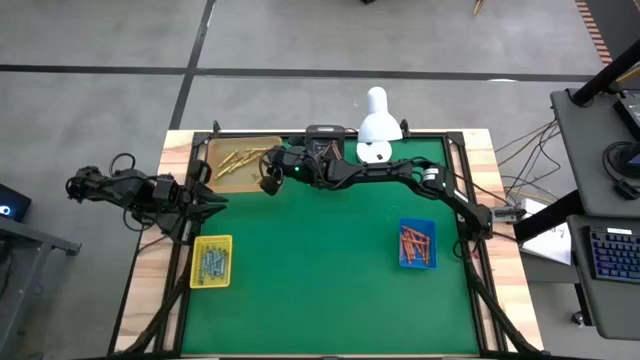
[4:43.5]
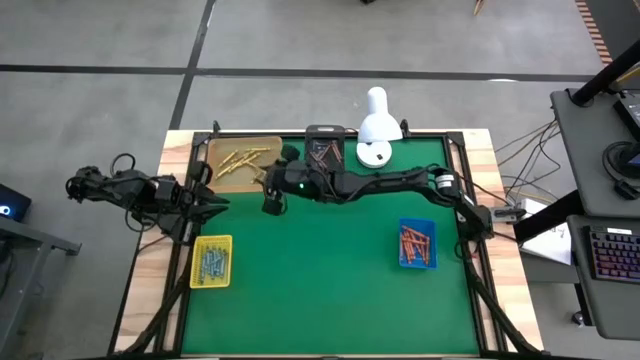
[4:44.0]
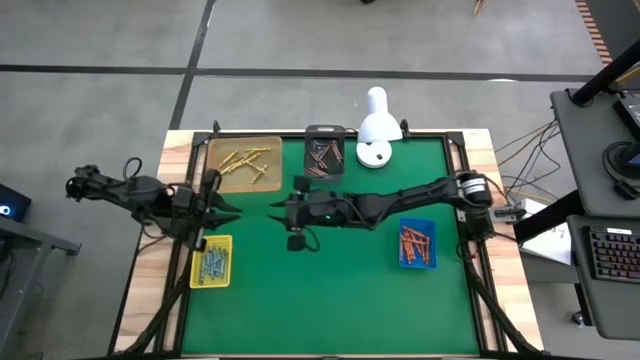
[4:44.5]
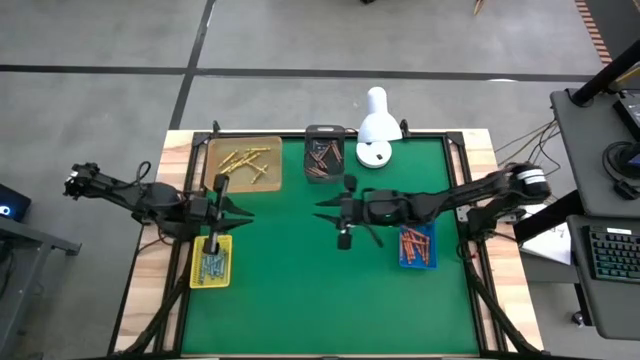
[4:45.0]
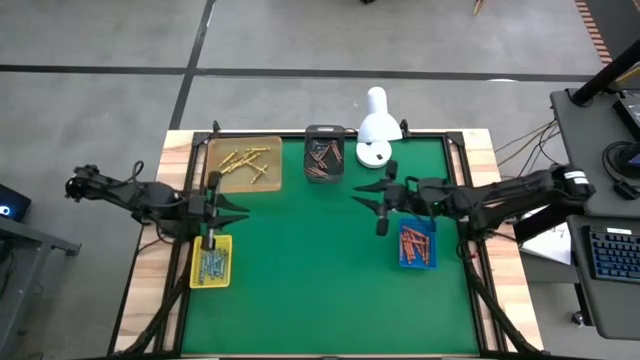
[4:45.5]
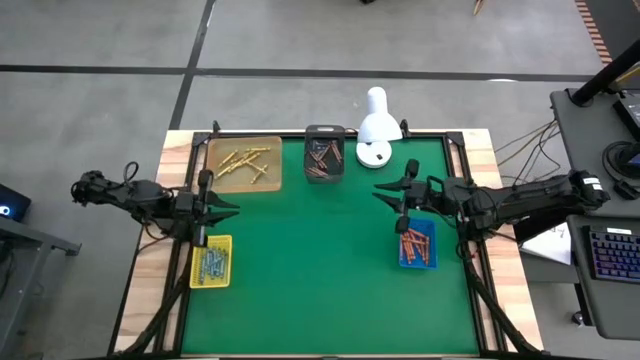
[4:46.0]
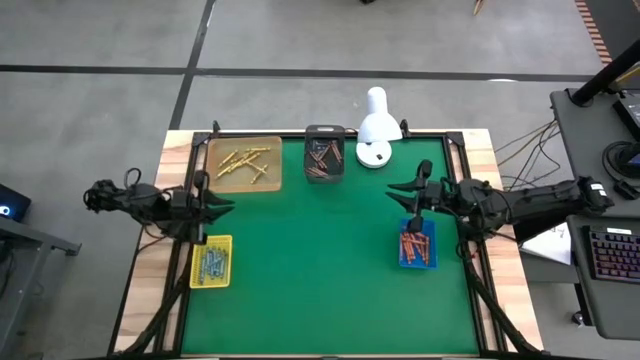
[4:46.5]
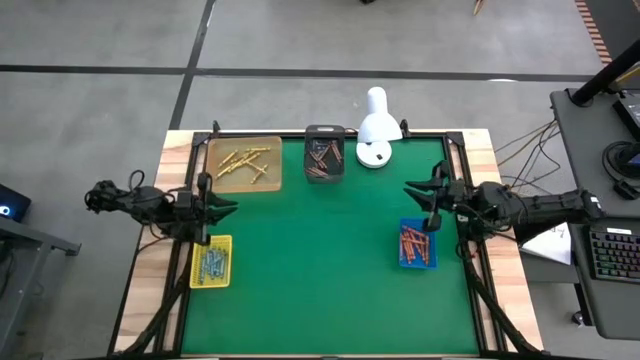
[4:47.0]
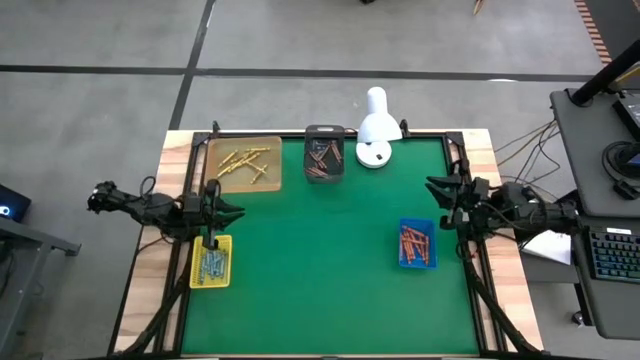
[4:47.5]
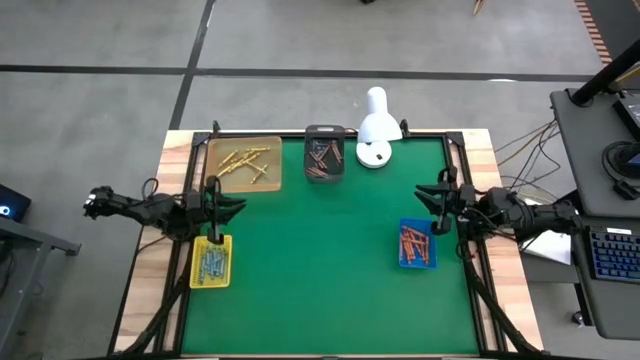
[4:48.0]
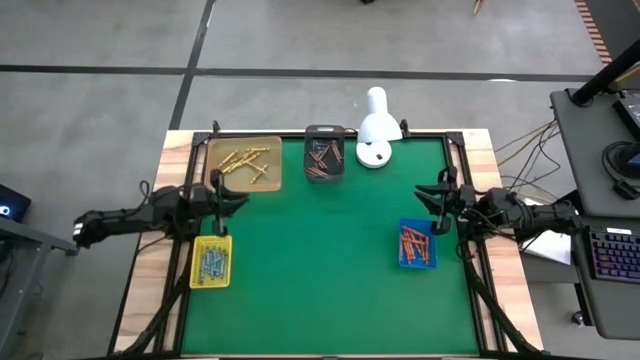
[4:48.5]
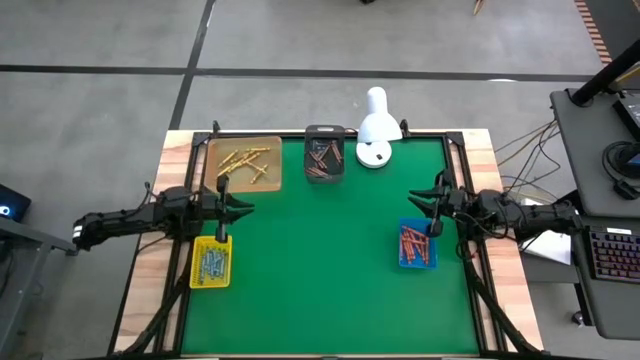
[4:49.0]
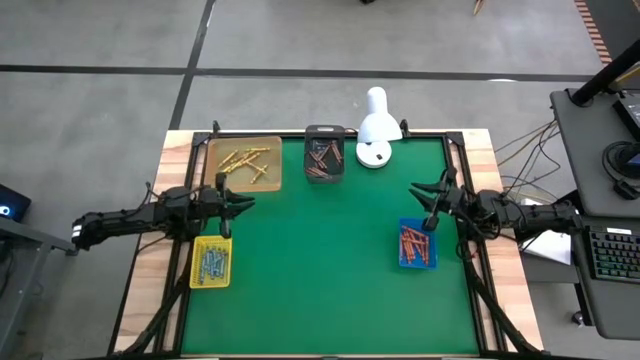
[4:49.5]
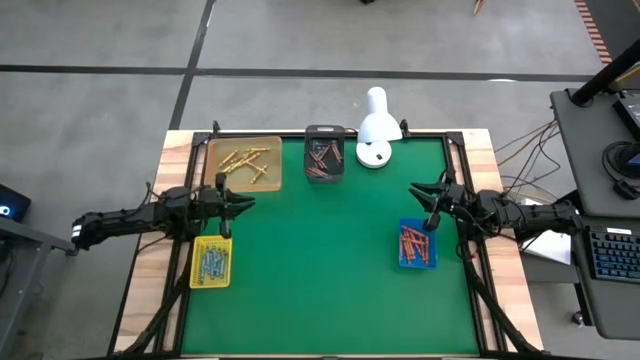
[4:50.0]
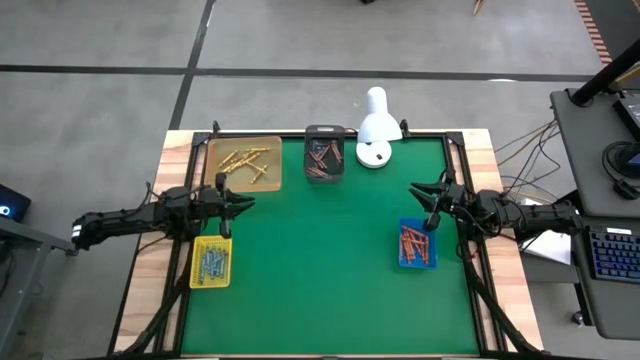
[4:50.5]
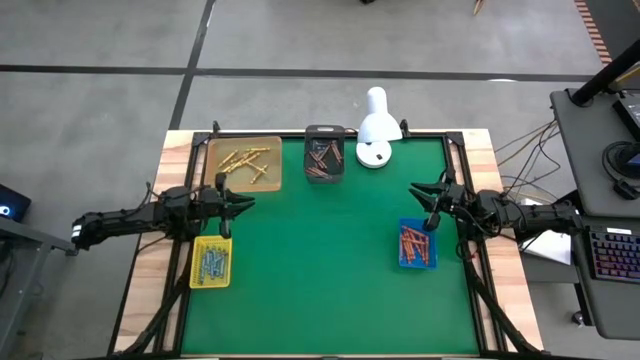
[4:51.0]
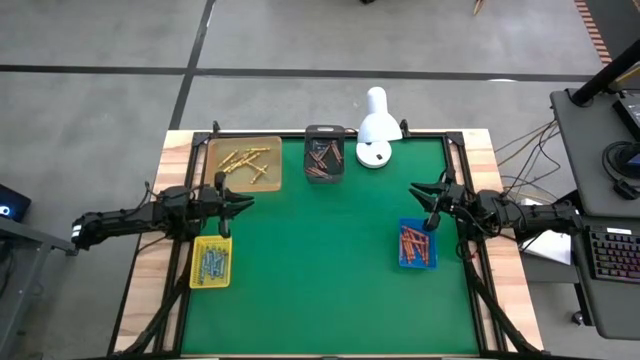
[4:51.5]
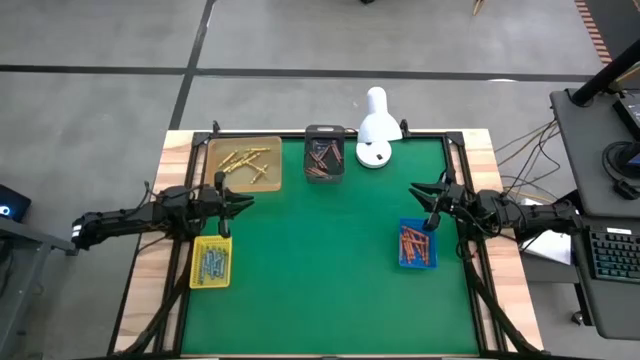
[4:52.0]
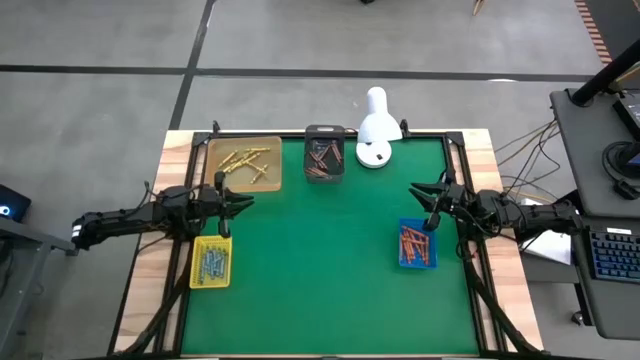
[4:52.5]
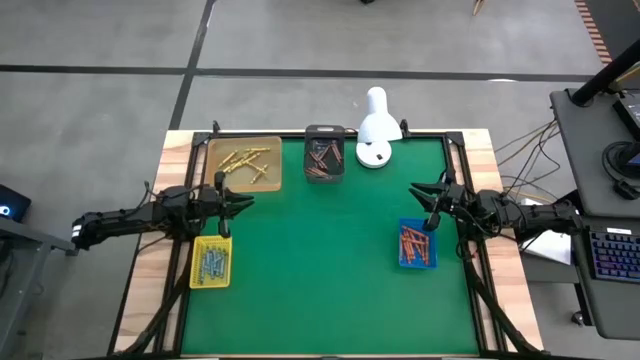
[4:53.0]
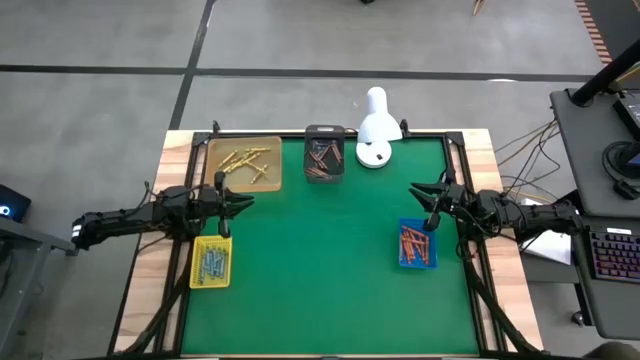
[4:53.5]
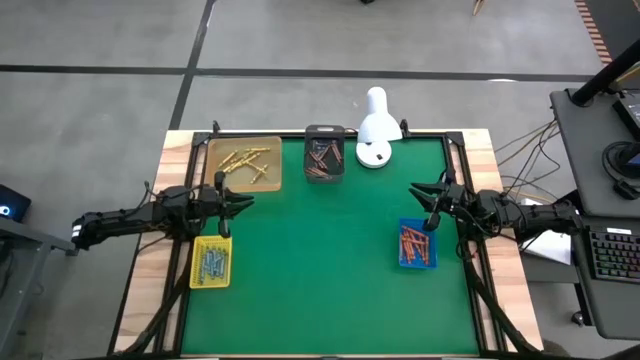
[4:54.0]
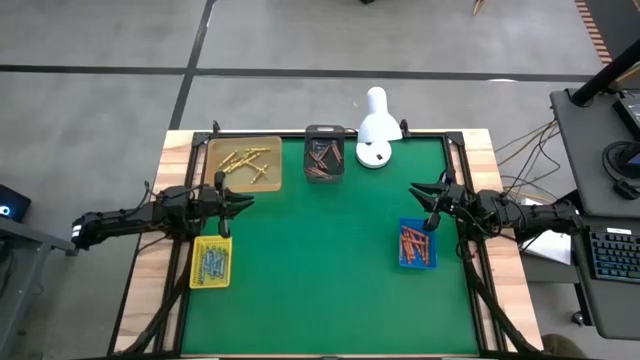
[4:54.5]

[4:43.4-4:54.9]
Task: Sort crayons
Return to Home Position

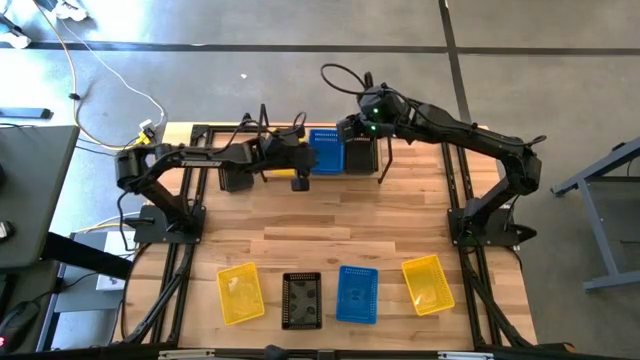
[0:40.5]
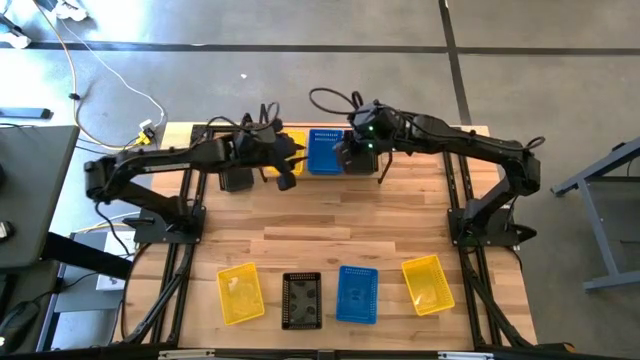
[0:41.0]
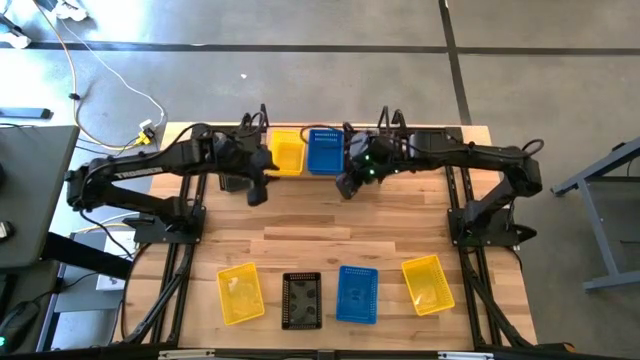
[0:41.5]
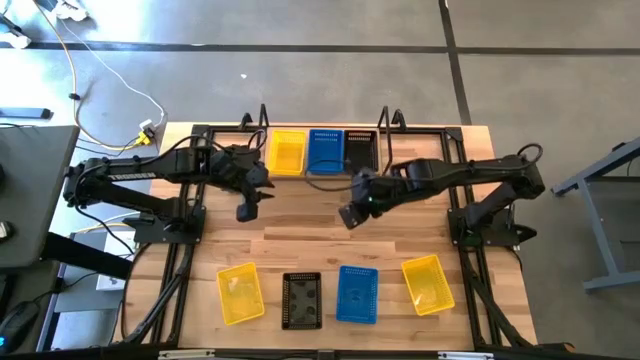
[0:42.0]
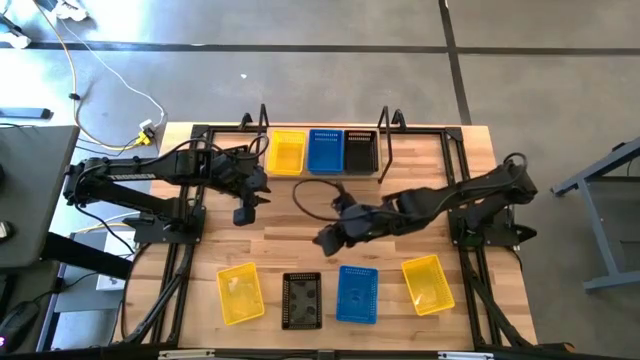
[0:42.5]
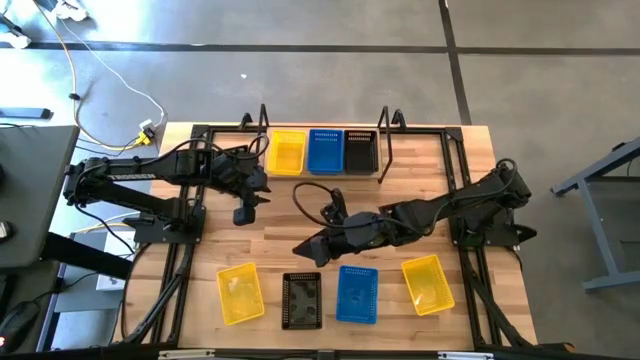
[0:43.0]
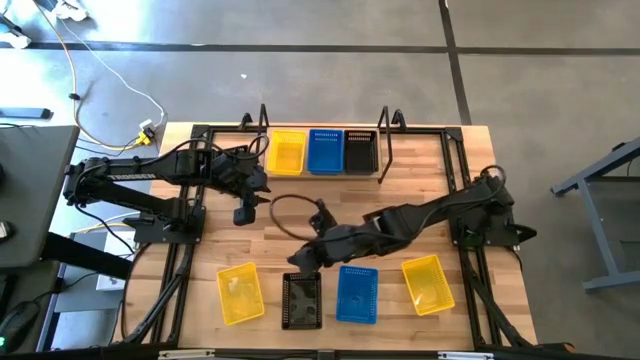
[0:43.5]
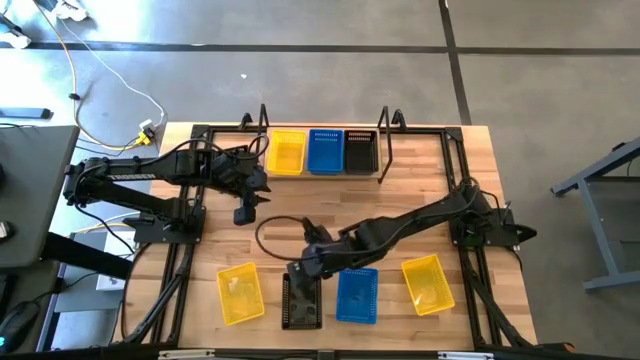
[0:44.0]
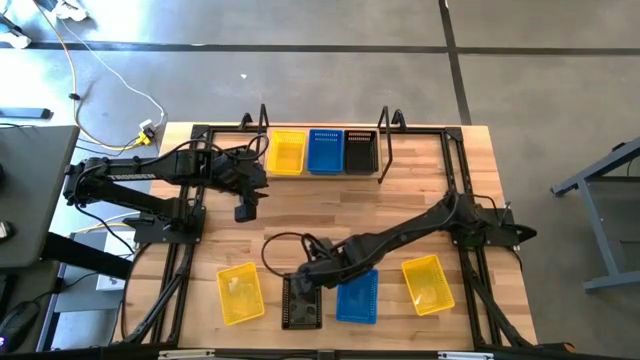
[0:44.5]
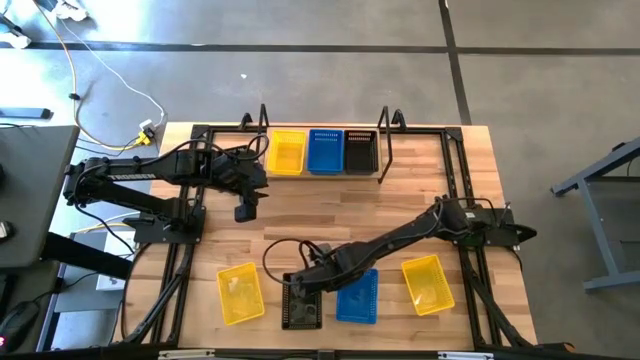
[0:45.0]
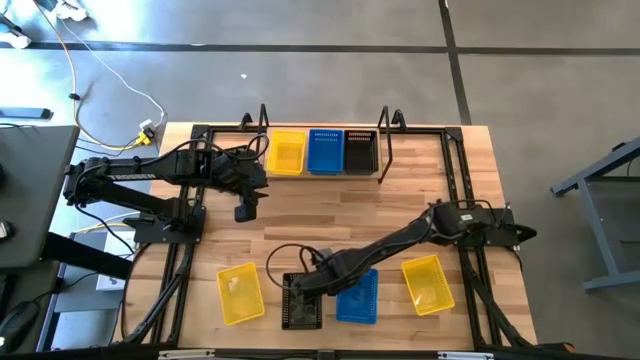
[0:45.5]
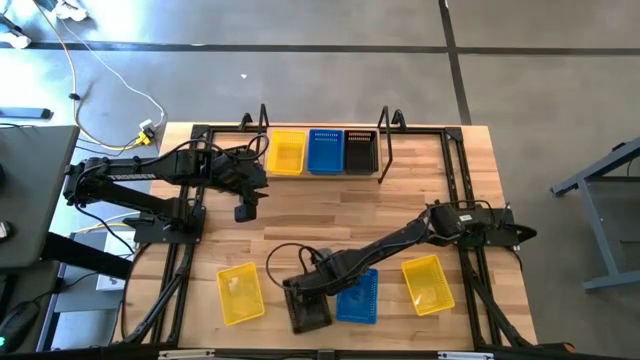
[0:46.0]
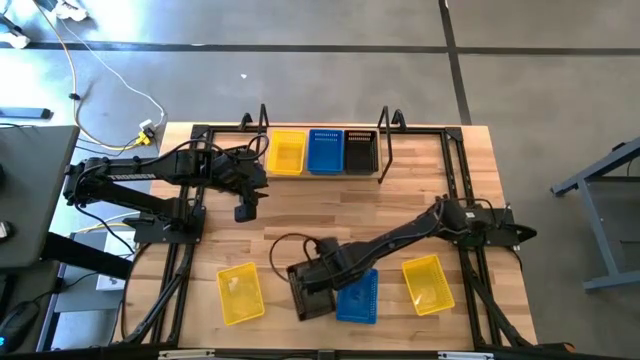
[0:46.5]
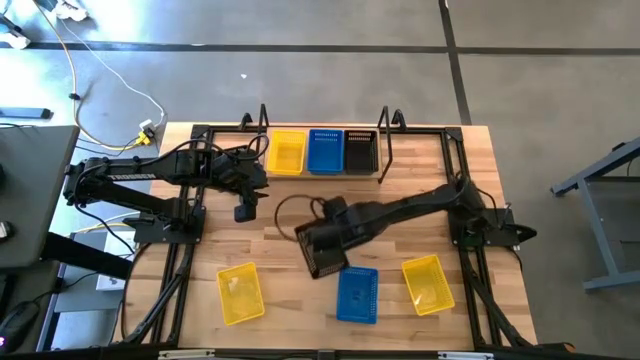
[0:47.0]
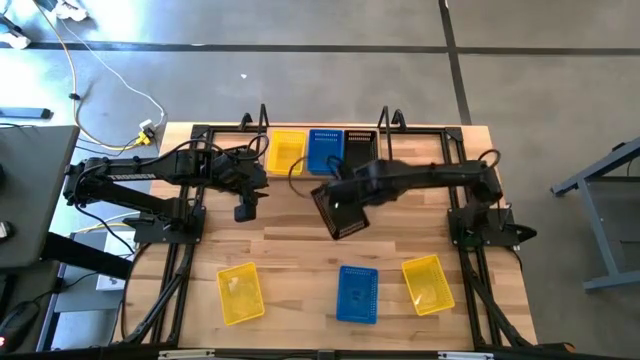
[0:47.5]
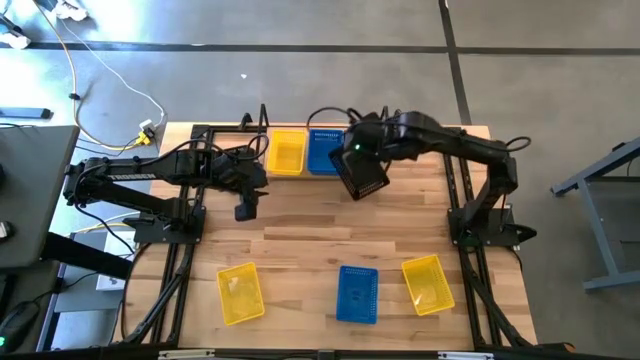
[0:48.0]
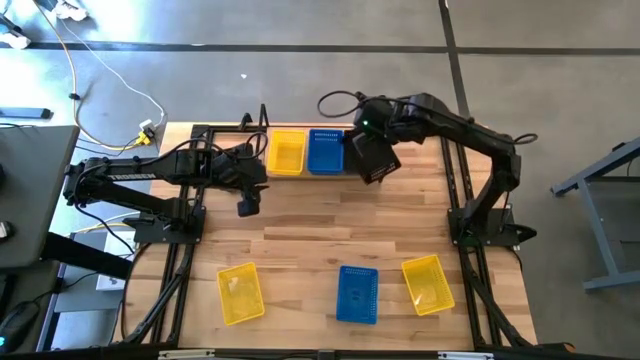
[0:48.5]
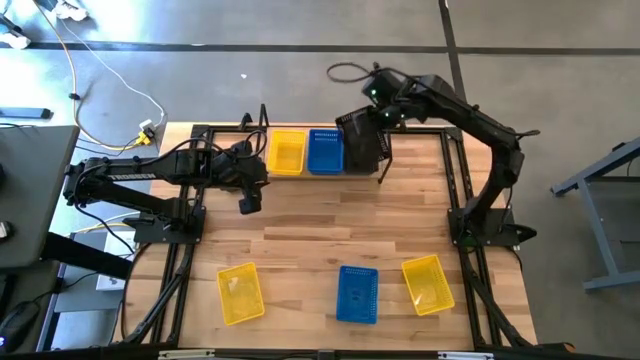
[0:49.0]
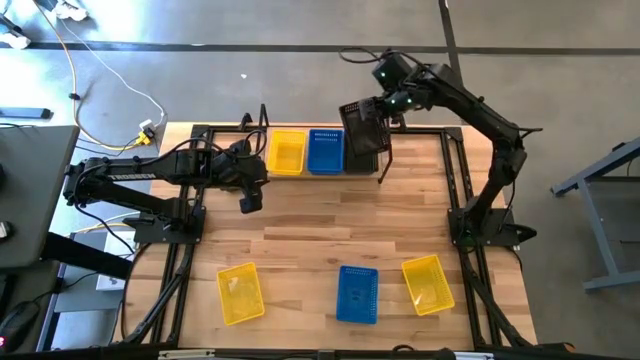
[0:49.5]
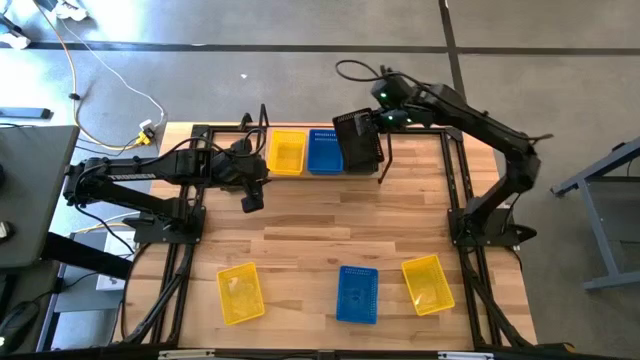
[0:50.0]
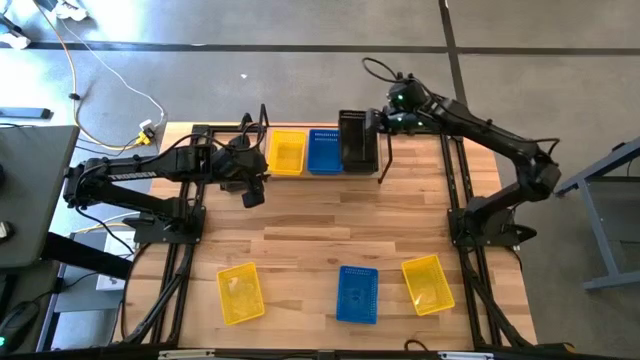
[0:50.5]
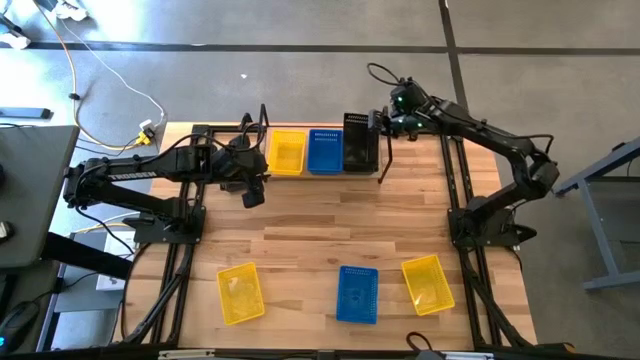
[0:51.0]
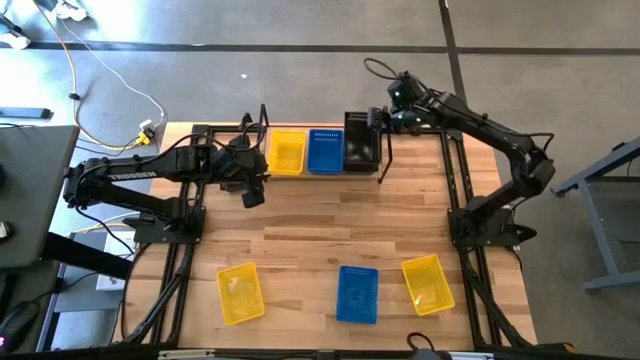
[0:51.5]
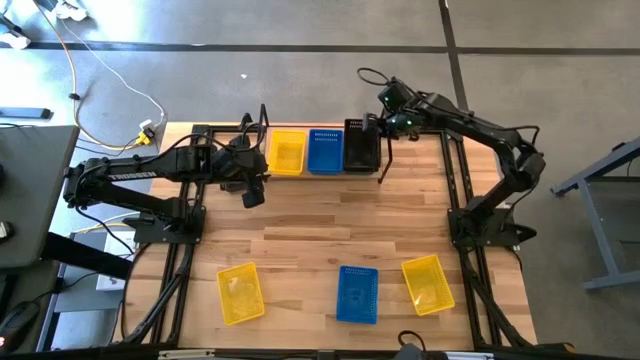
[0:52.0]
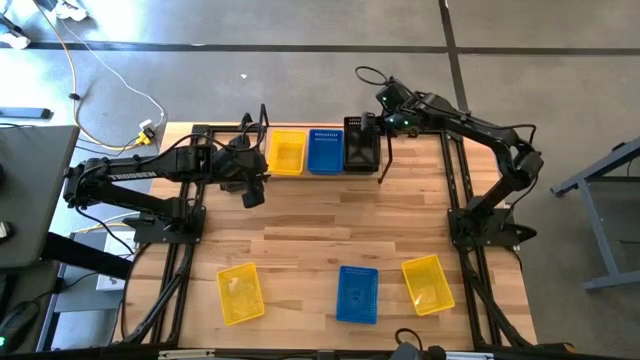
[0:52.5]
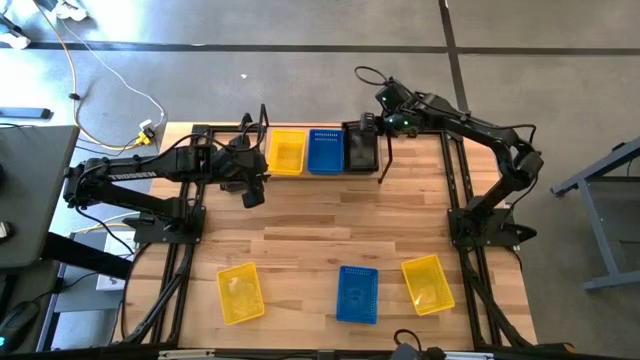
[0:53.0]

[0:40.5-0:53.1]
Task: Stack baskets on shelf by color
Stack the bottom black basket on top of the black basket on the shelf
